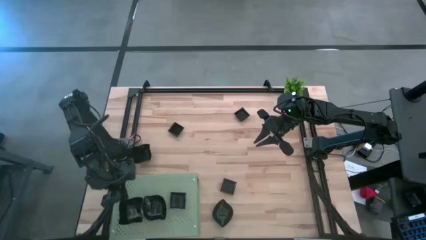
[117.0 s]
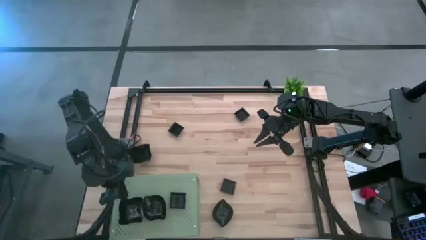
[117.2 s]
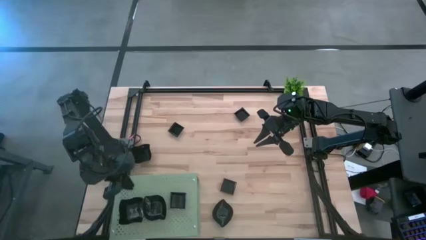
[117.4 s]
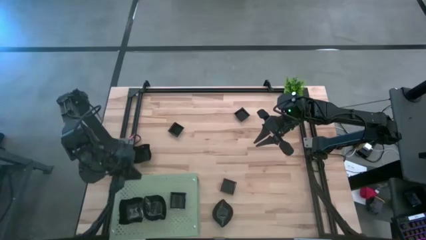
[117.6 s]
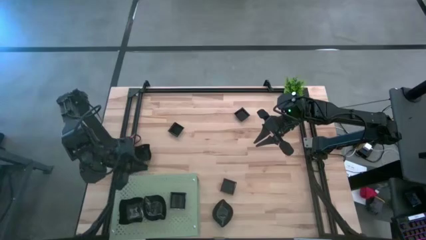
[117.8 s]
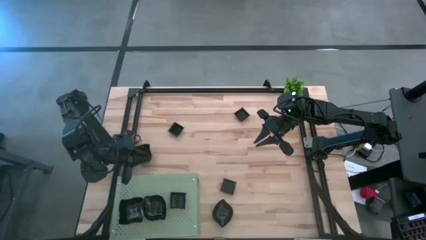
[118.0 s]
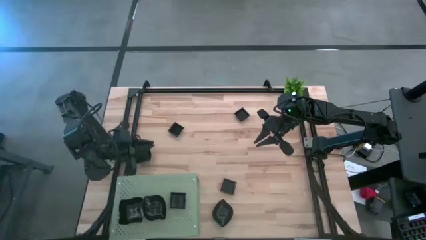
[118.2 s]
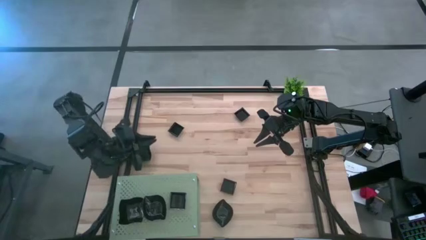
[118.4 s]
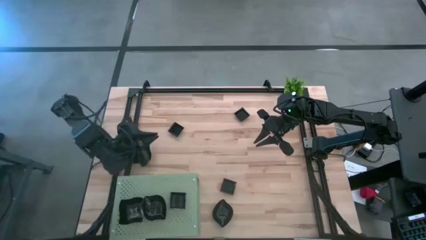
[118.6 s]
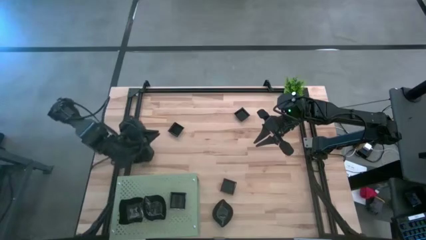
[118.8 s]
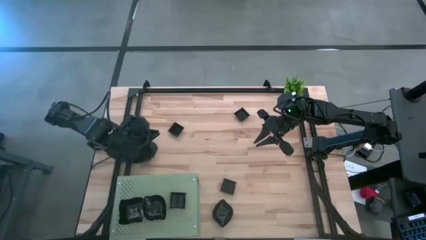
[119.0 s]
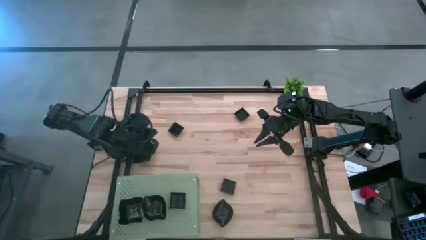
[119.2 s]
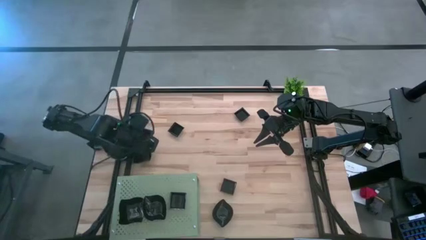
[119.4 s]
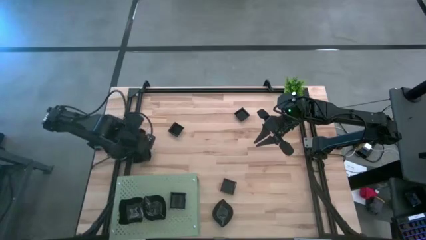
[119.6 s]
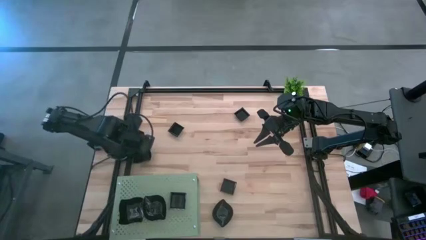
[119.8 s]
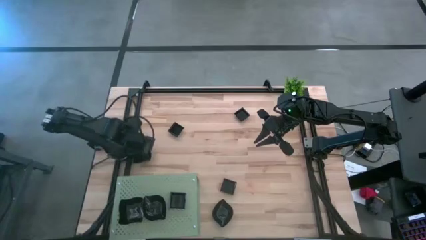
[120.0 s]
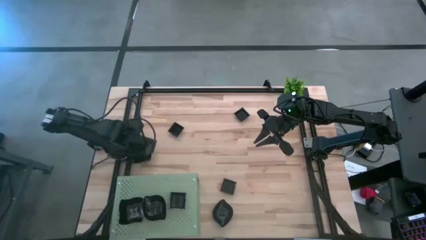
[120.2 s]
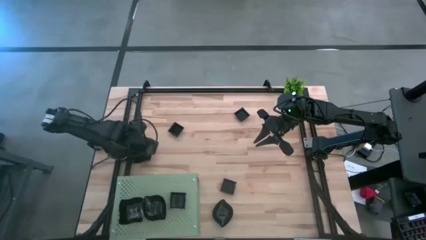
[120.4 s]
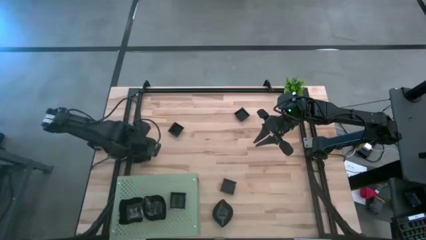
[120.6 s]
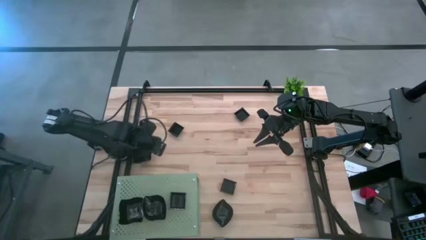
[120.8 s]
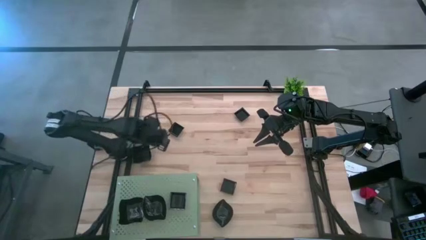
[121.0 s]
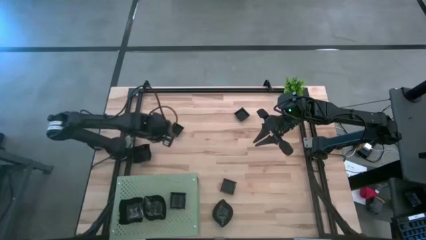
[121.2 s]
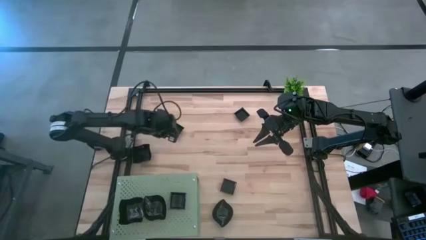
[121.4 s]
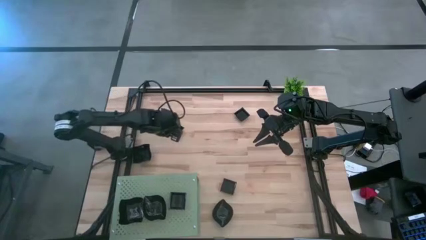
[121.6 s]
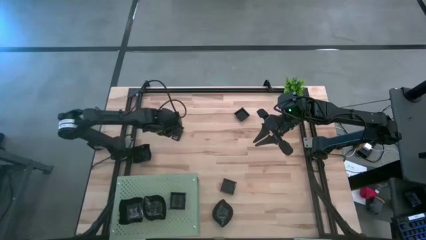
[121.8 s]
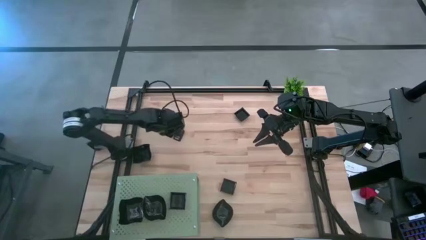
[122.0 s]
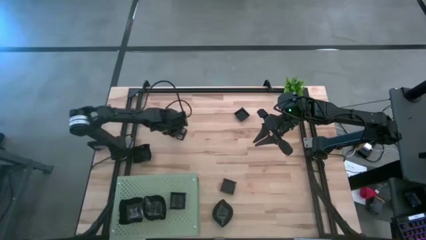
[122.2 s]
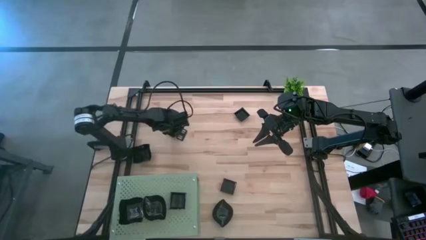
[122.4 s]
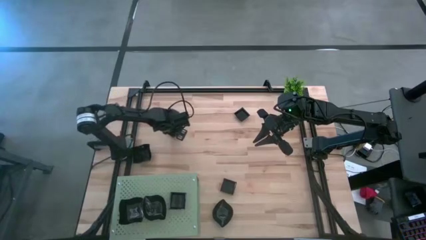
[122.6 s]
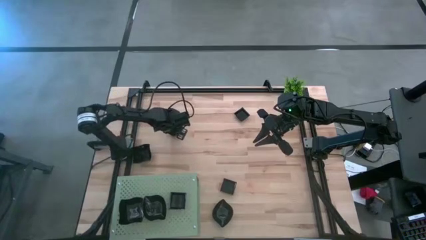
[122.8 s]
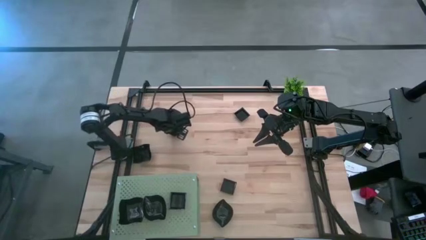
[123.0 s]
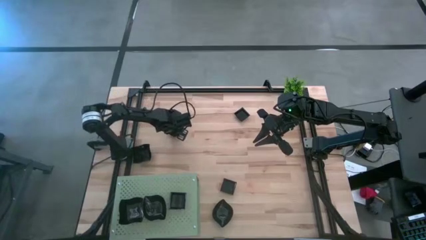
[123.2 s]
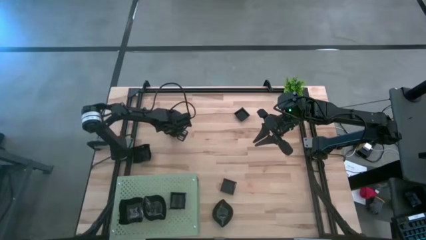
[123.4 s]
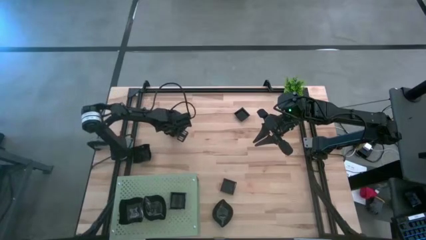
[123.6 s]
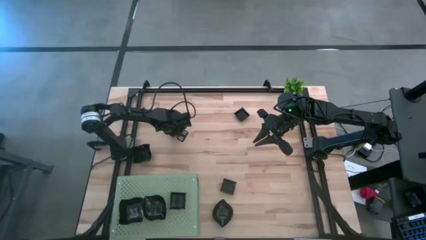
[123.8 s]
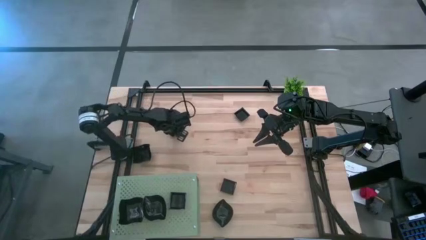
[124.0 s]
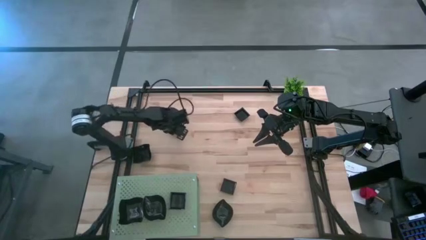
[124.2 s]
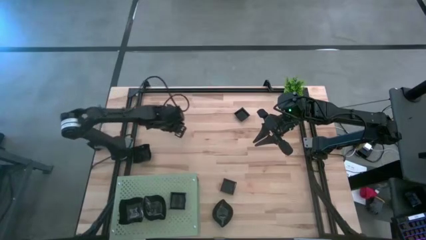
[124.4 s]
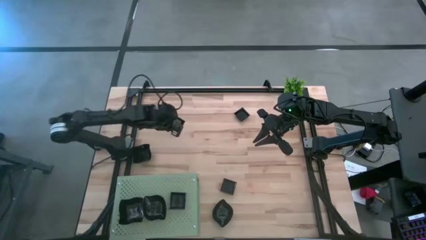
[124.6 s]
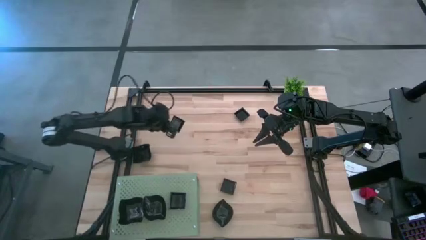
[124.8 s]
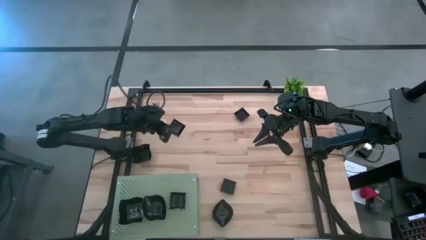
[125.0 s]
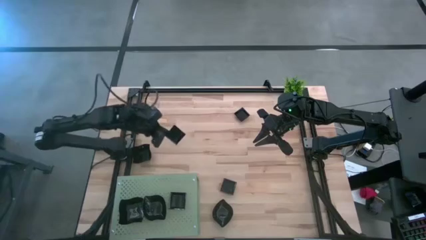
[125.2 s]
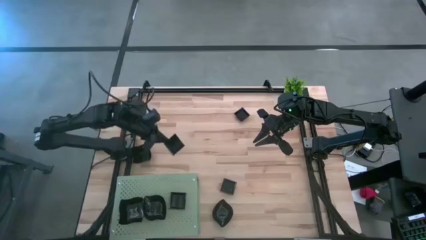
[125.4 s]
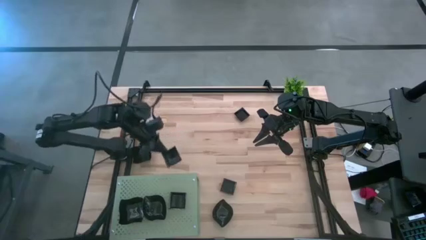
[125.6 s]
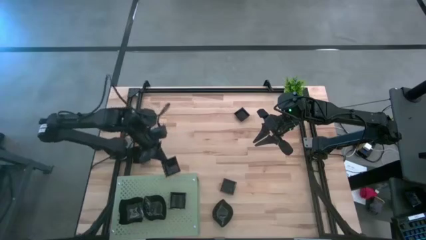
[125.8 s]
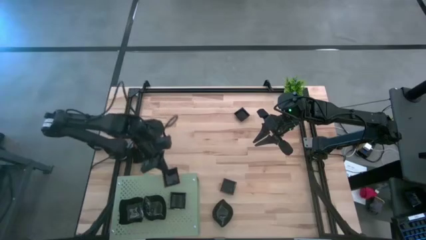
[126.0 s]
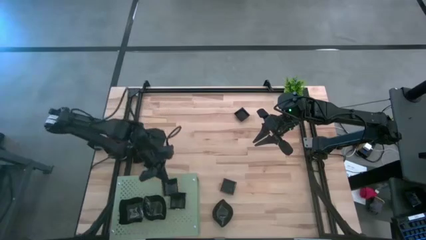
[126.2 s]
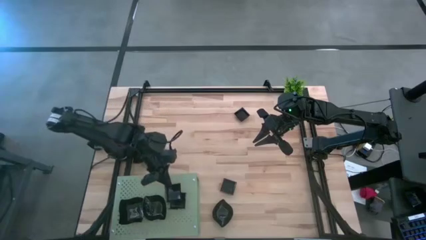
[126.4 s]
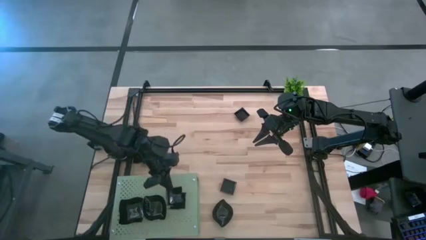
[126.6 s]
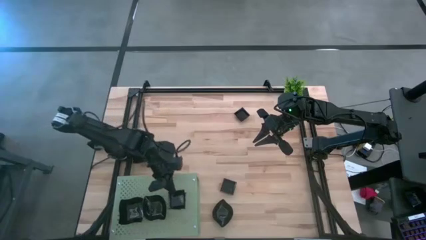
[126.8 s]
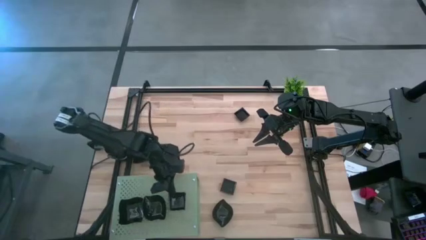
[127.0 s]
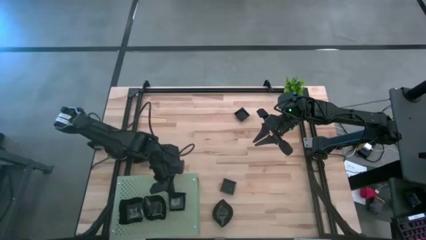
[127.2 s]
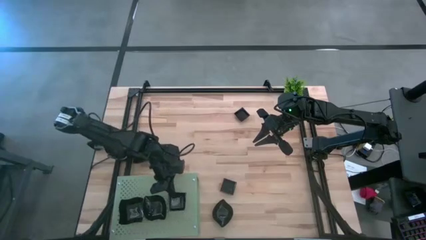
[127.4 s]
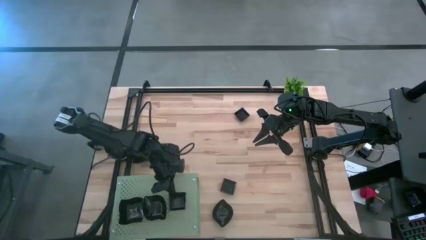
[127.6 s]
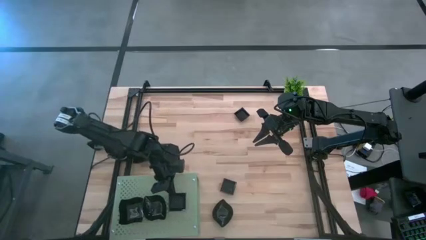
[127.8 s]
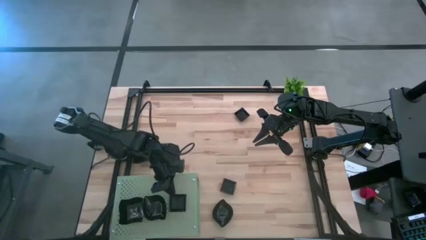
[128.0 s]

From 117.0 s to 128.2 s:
Task: Pick & Place Mini shaped plates
Stack the black square plate on top of the other black square plate on the shelf

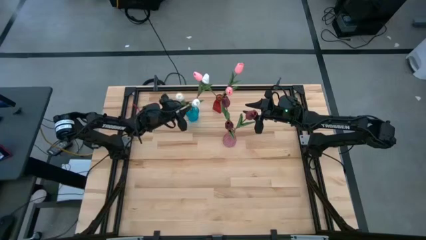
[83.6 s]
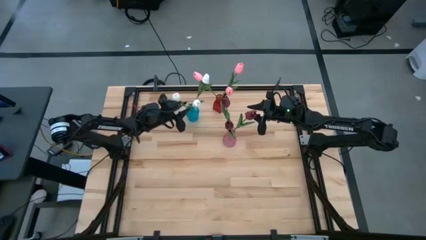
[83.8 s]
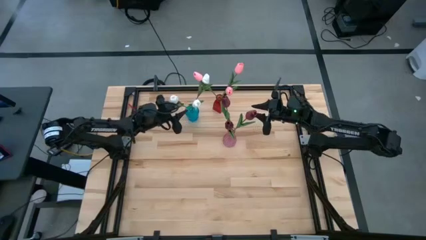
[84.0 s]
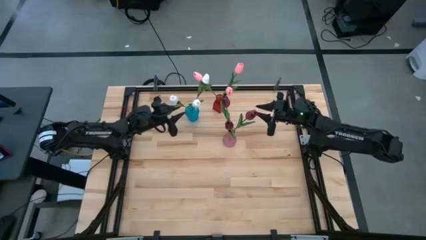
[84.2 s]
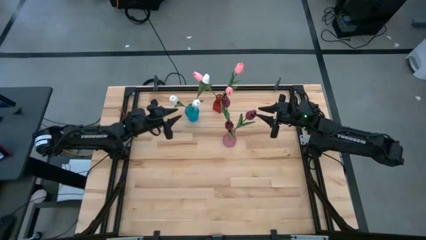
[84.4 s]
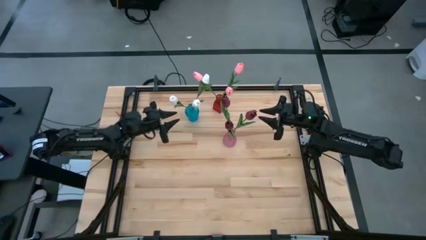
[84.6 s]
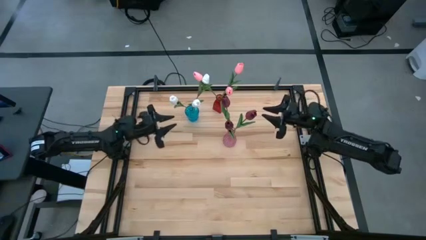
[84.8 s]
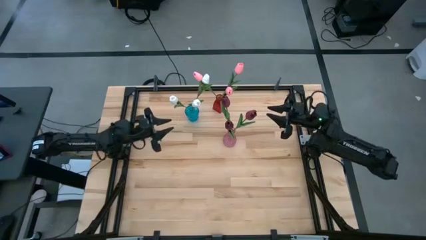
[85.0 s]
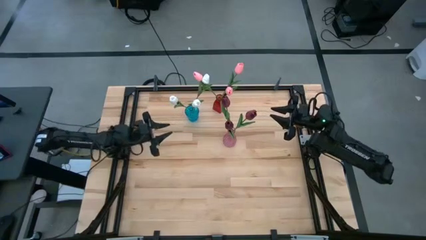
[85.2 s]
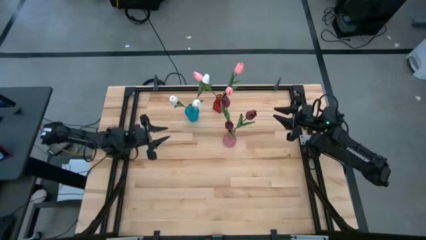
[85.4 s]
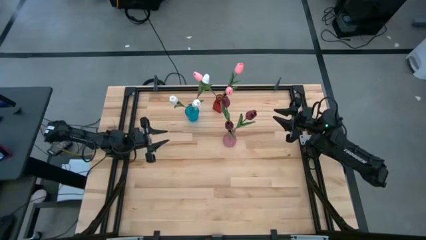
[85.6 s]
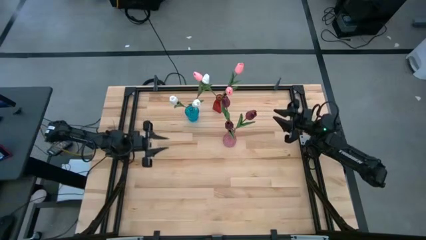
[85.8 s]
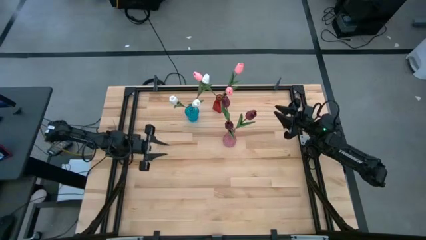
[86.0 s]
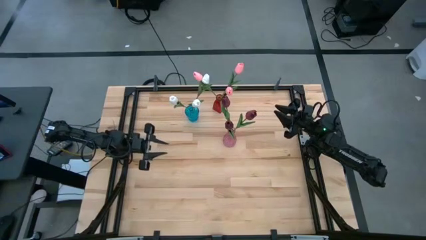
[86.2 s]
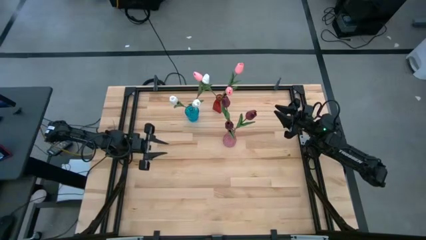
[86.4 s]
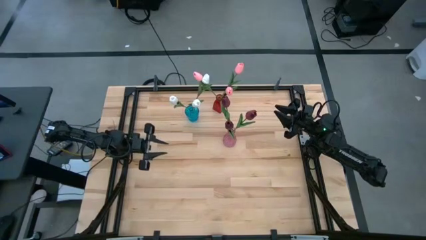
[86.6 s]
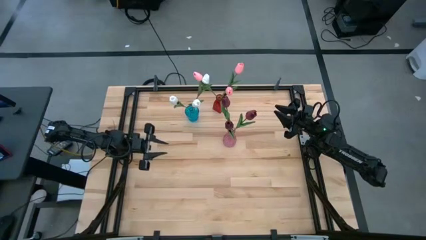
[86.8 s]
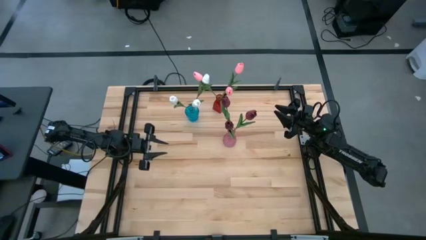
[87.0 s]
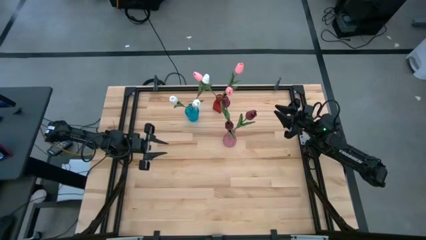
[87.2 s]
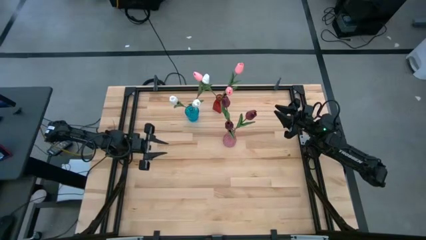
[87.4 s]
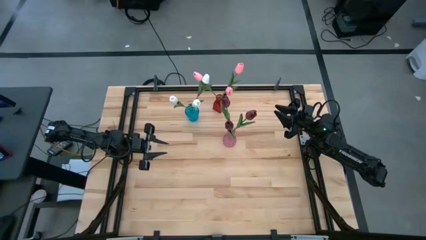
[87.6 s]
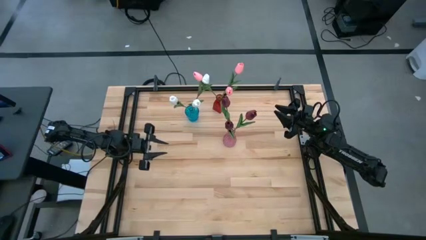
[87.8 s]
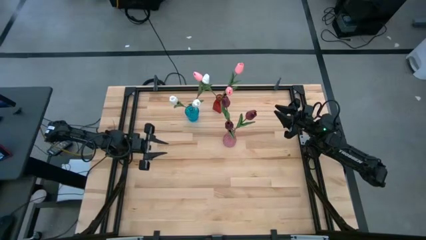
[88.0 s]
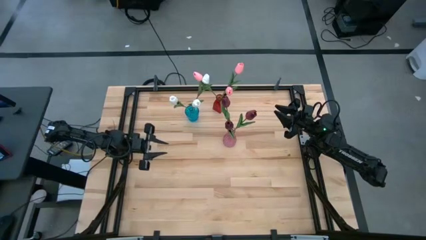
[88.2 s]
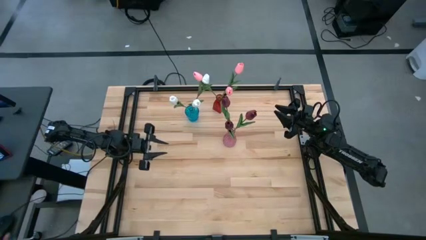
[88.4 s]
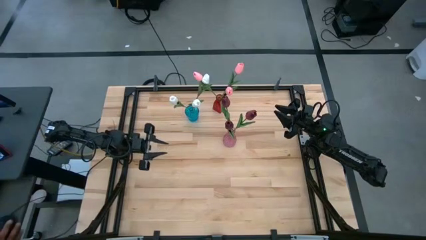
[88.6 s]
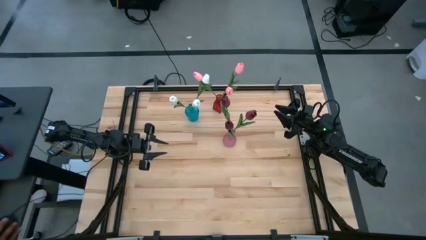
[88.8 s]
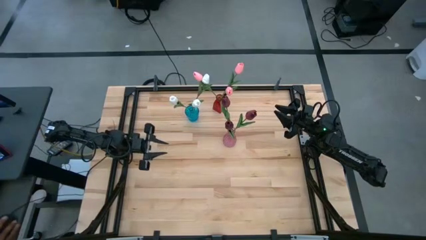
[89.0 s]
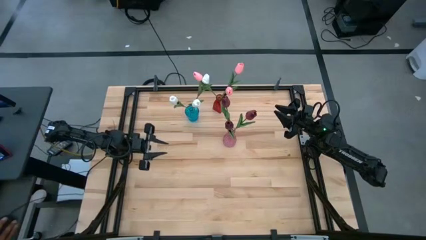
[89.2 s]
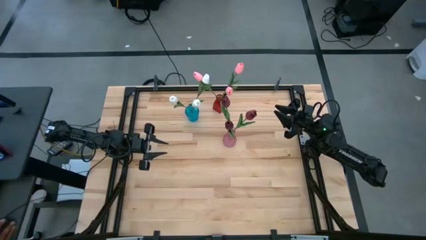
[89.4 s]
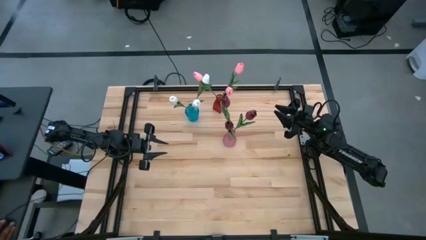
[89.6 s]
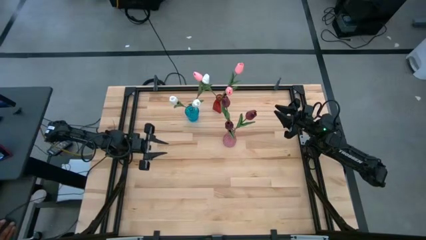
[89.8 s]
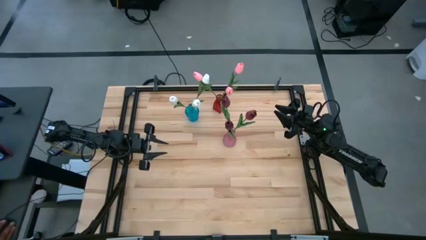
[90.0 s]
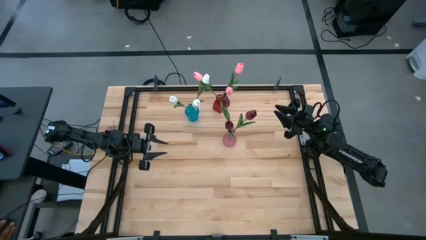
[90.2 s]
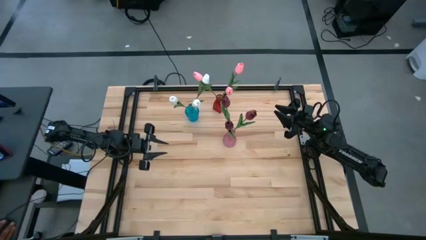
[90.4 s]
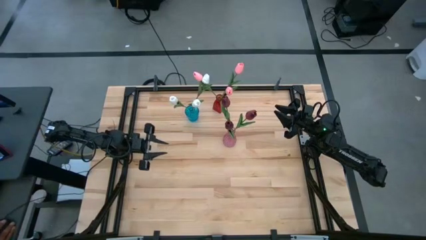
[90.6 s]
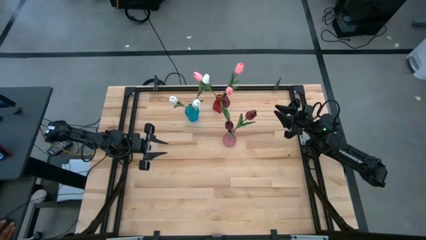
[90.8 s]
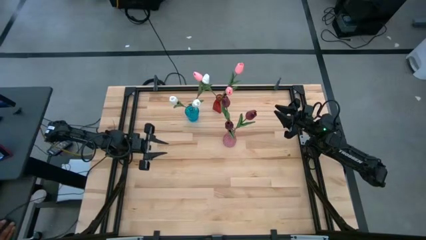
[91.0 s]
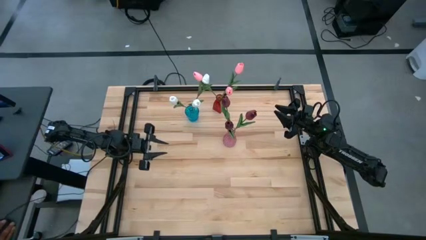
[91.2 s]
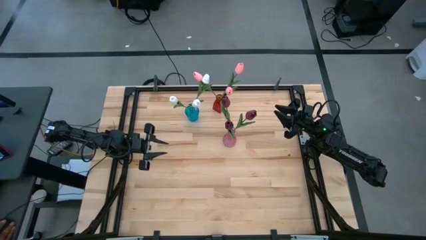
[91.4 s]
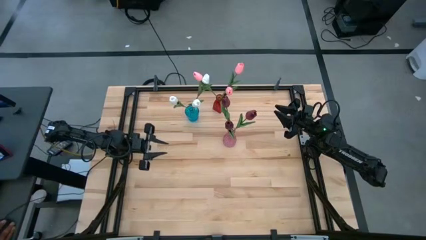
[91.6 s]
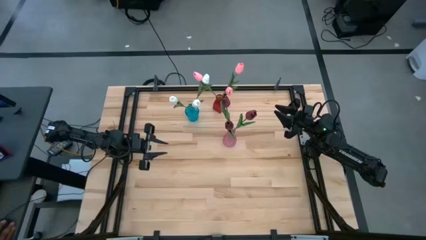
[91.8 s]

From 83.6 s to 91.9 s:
Task: Sort flowers into vase by color
Return to Home Position
